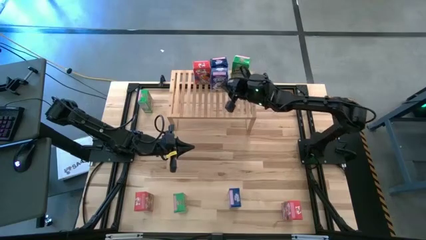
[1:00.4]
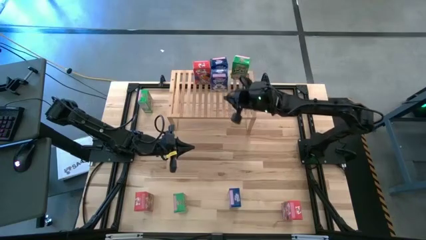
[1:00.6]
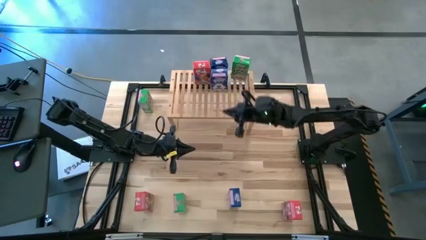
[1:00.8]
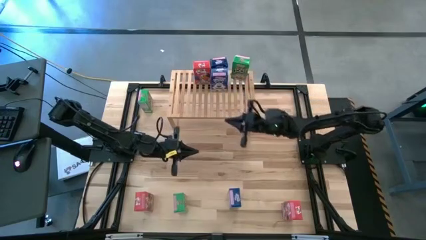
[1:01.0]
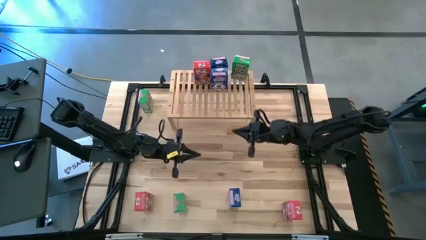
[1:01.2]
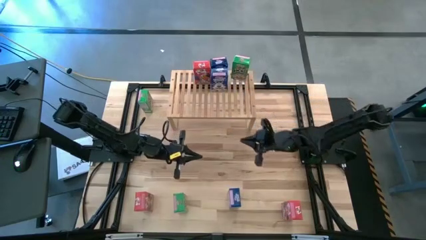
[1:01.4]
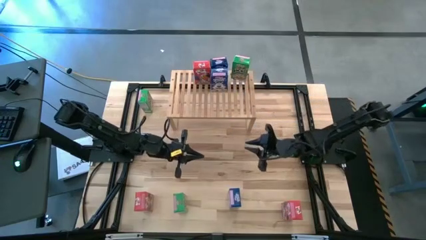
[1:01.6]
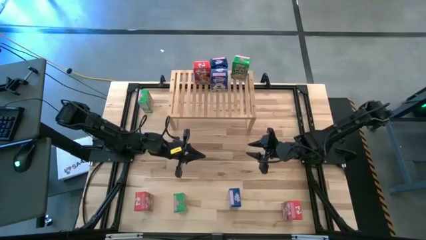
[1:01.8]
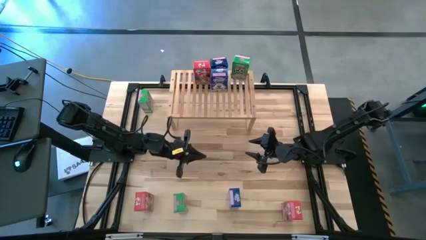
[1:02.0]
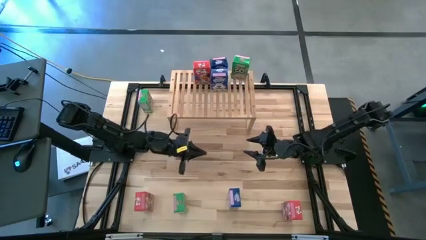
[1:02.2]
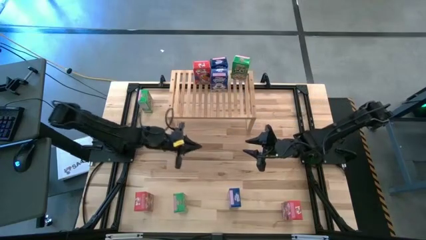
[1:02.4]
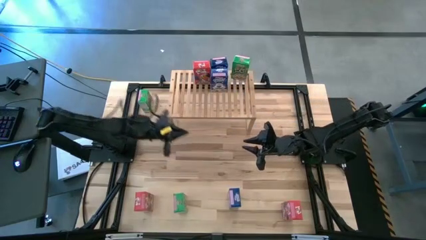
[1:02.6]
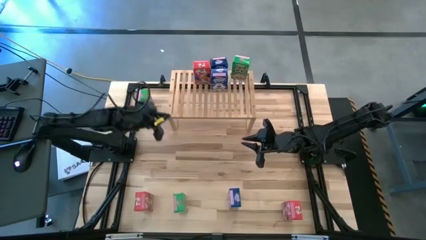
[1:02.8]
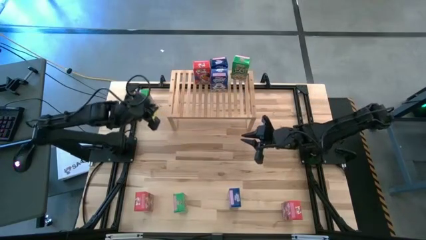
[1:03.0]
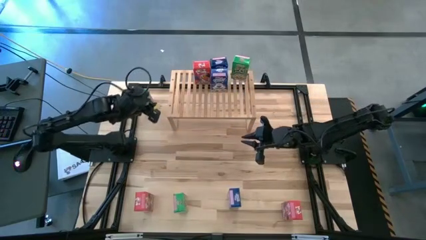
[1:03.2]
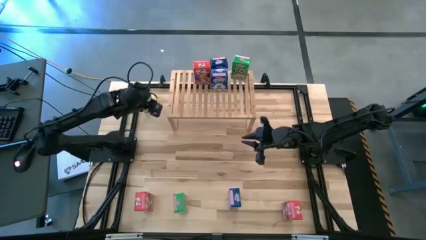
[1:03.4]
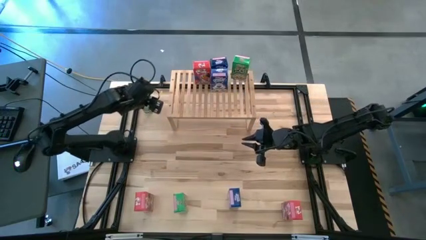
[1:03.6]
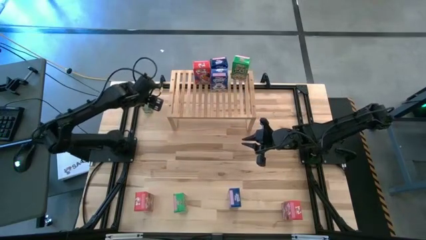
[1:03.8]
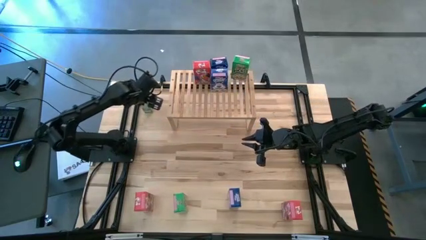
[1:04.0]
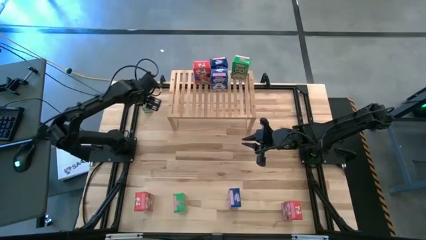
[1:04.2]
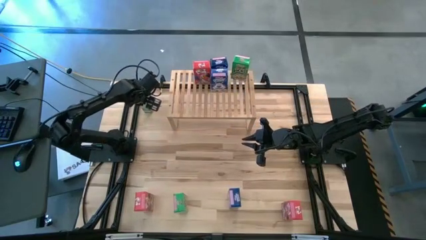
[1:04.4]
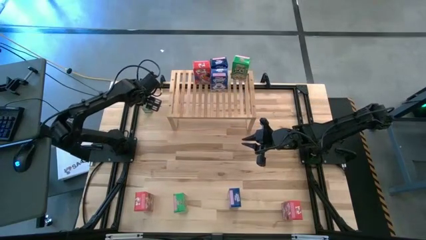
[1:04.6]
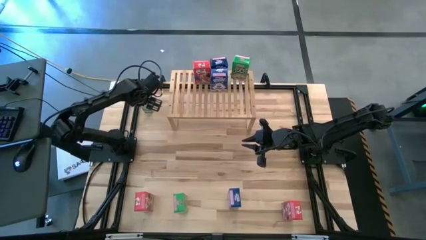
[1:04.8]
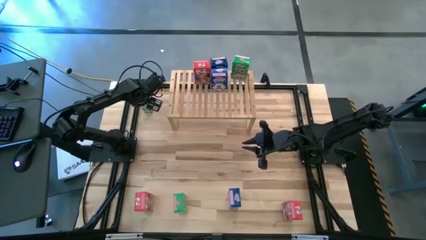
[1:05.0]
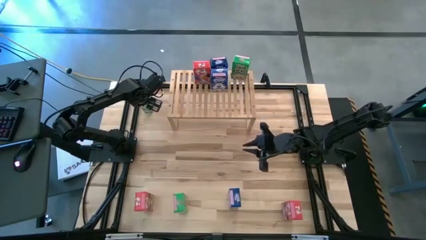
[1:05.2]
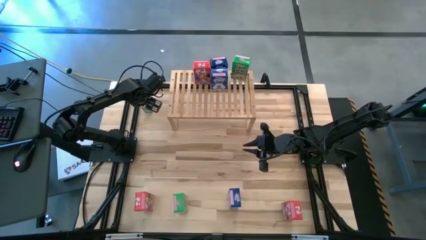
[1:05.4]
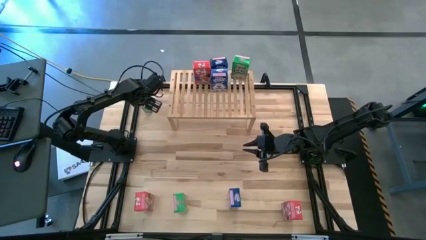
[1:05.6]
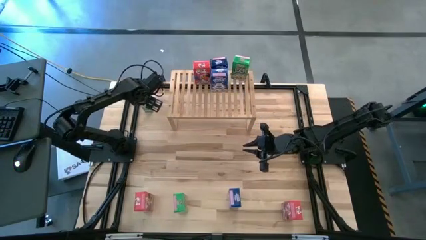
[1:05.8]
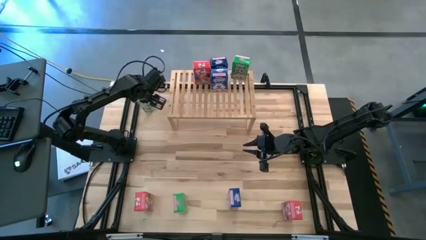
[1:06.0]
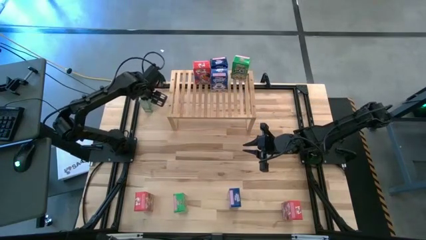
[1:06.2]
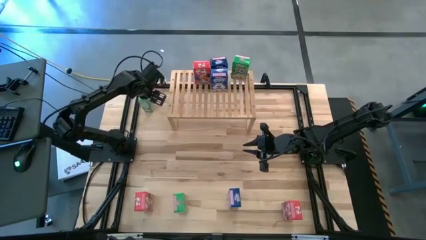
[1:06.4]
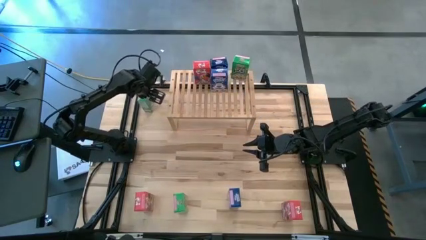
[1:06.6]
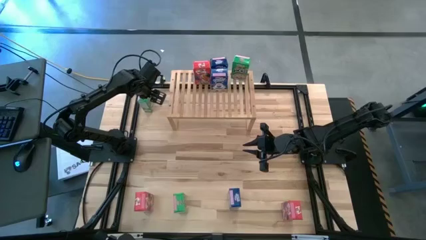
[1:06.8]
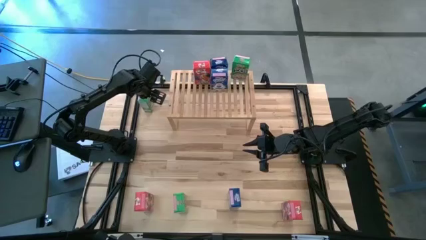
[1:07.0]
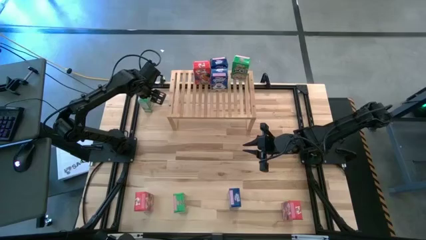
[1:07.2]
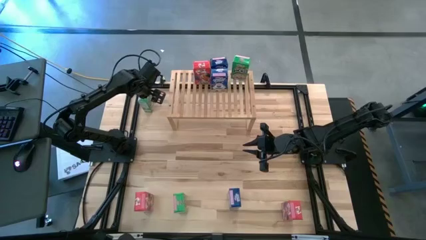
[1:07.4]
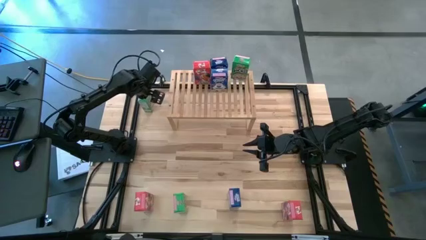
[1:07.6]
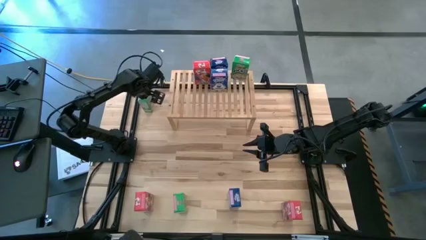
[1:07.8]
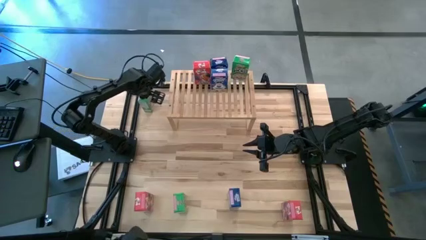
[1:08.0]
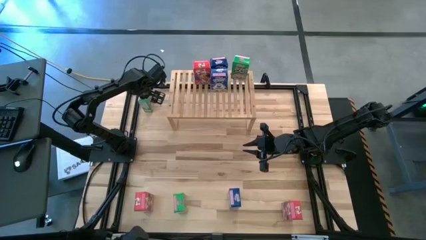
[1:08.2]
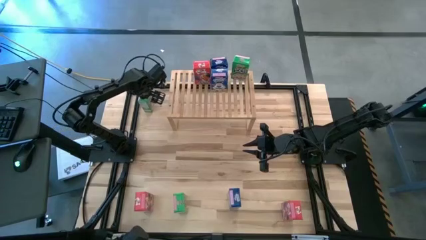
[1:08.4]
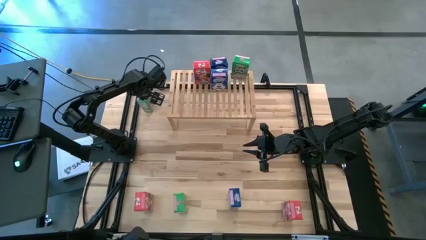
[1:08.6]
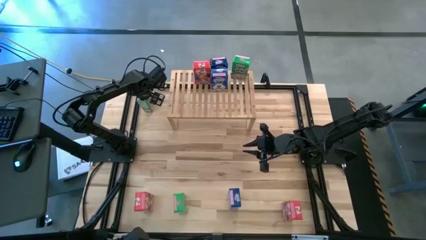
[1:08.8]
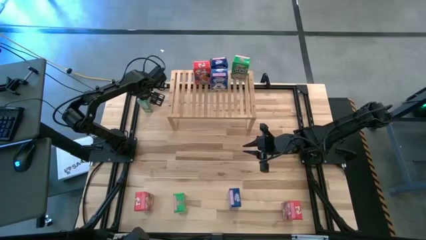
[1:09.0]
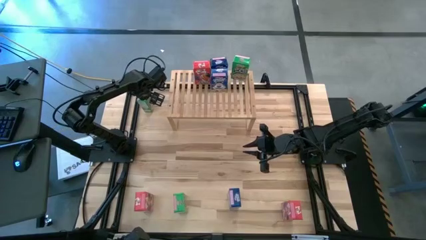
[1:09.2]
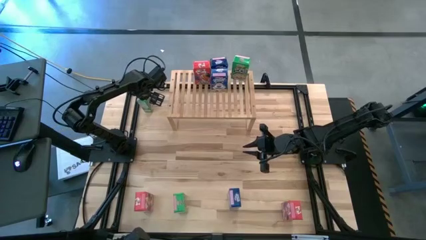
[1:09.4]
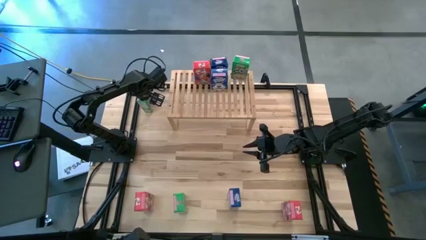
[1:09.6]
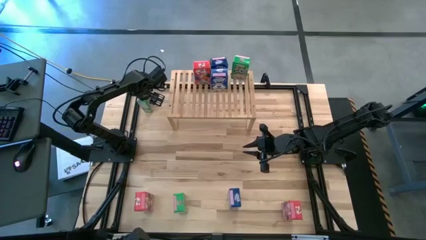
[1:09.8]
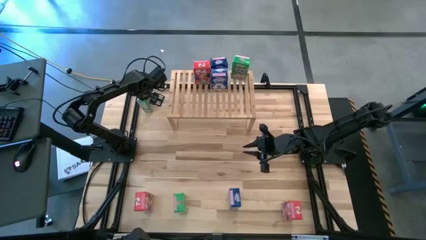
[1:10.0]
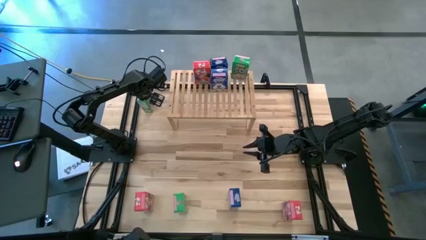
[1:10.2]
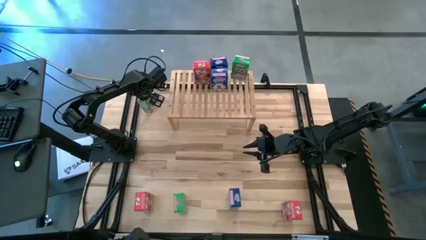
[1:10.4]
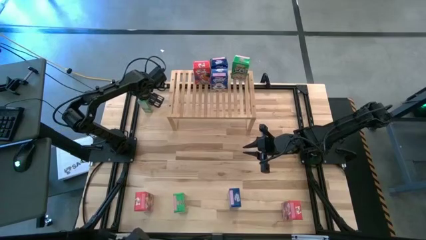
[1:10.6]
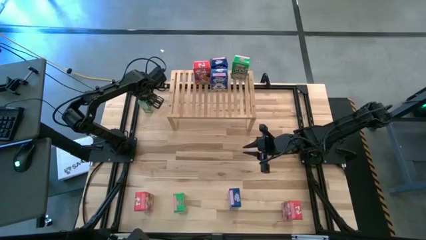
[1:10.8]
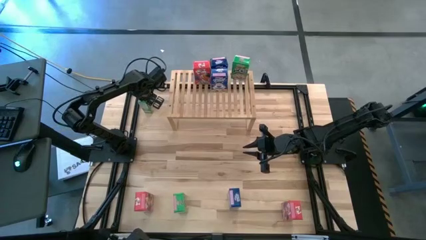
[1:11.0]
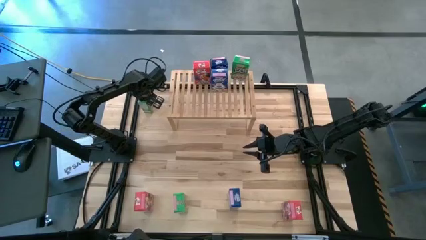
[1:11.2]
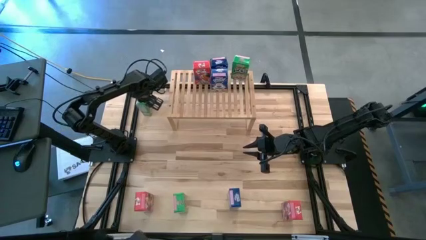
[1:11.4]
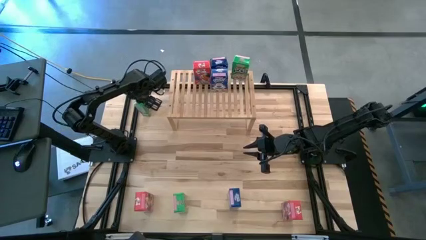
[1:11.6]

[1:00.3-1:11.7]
Task: Stack cereal on shelf
Put the top green cereal box aligned with the other green cereal box on the shelf

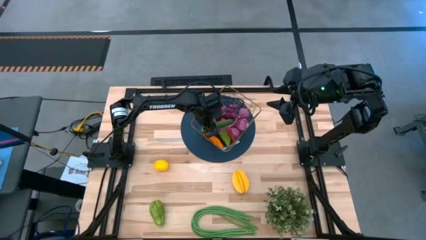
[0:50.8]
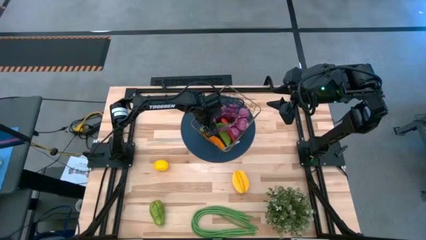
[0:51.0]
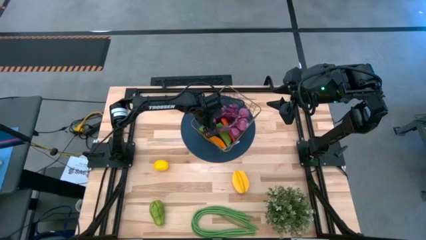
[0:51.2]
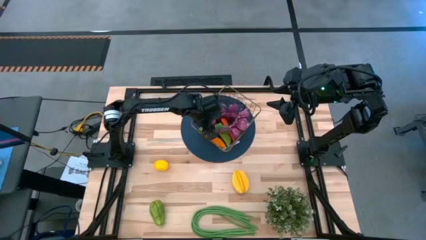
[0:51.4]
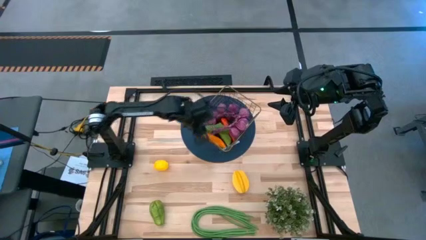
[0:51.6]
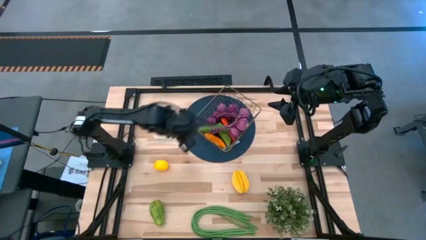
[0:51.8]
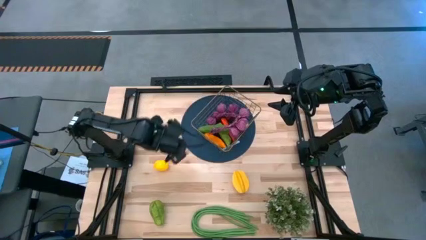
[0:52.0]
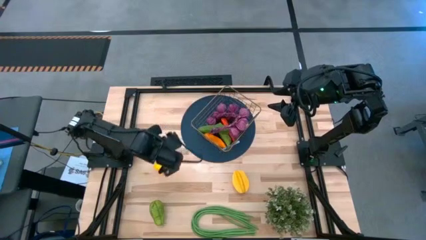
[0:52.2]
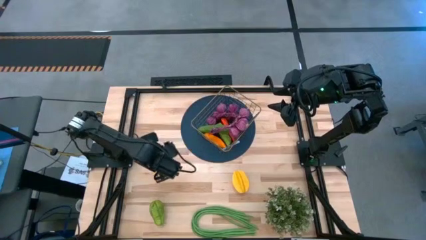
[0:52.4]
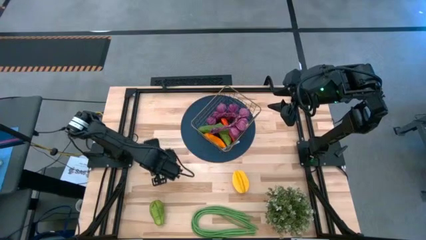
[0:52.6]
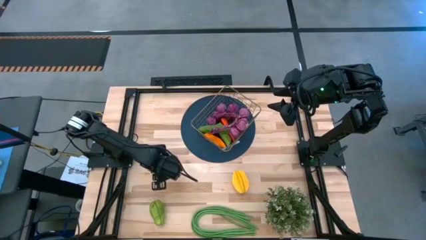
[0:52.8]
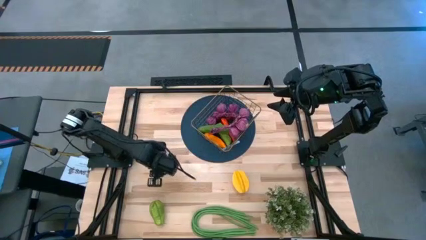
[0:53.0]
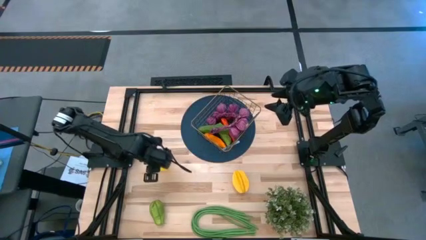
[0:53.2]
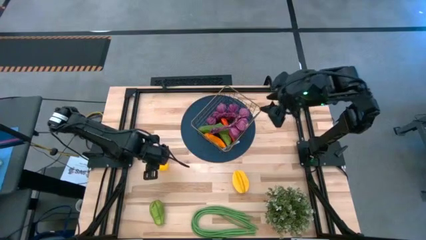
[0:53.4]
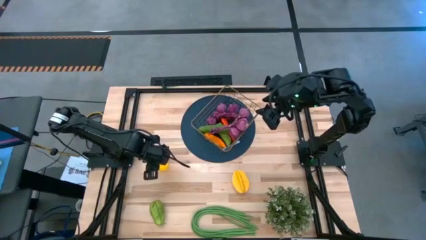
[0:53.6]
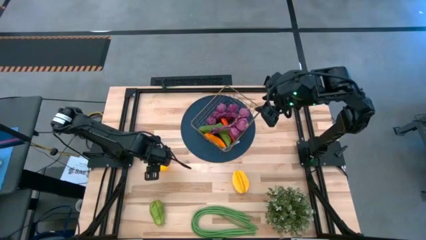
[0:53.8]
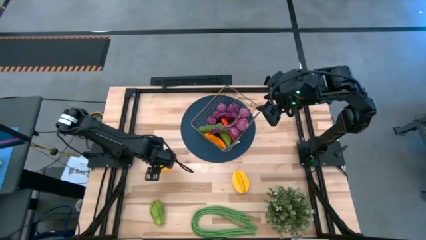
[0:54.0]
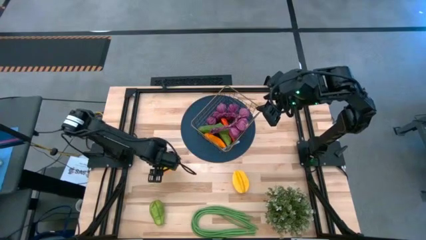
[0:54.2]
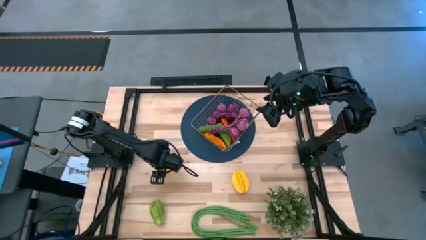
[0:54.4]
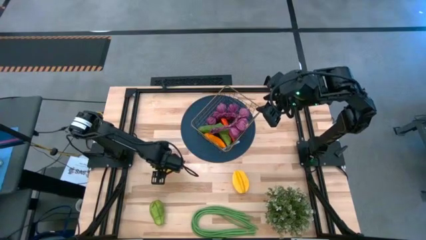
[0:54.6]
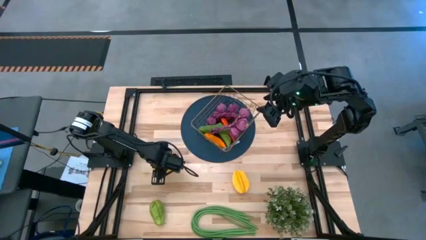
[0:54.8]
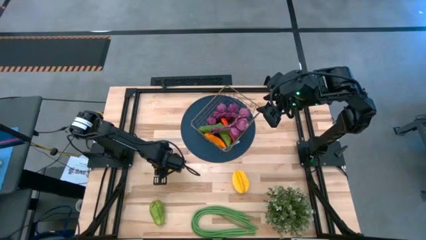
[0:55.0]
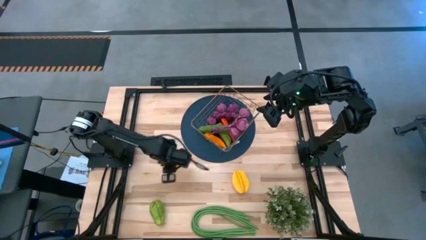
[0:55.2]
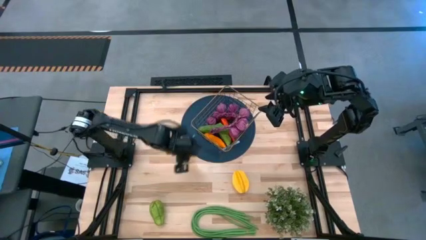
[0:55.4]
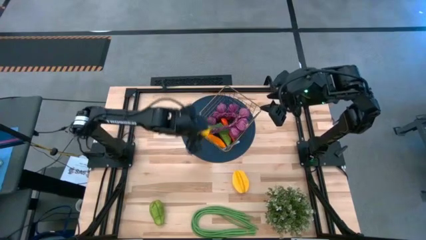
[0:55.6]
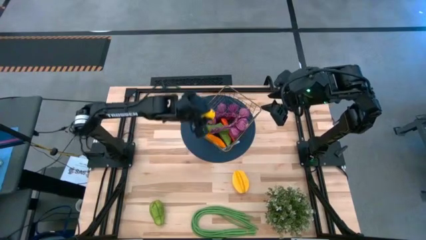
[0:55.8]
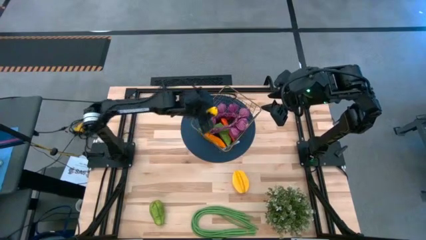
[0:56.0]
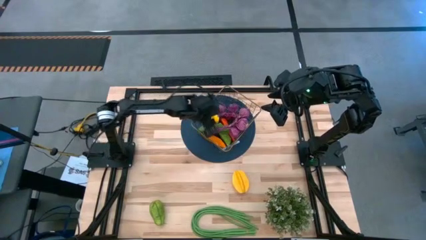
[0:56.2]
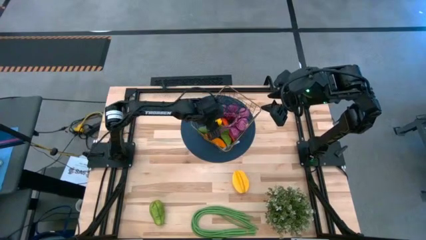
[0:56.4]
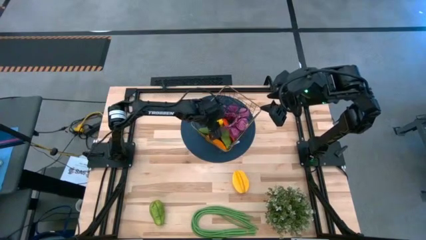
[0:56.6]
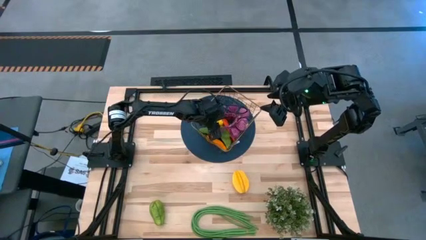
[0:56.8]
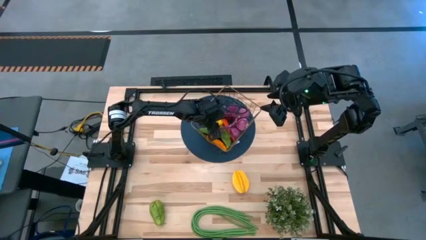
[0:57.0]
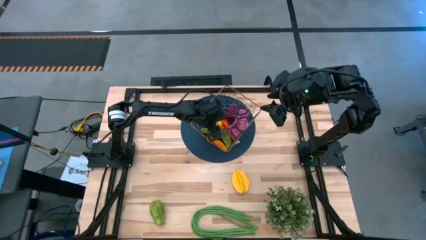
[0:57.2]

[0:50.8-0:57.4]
Task: Build produce basket
Put the lemon into the wire basket
